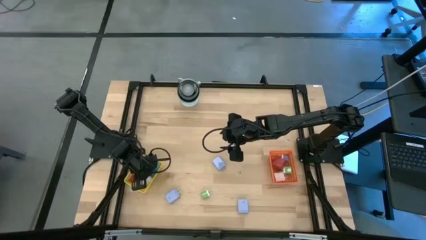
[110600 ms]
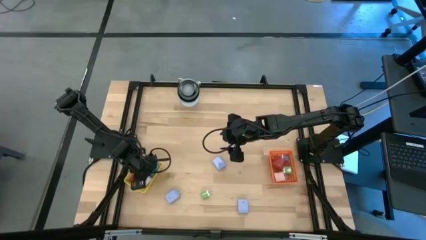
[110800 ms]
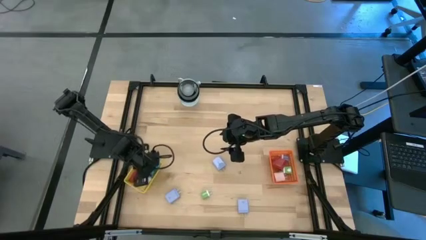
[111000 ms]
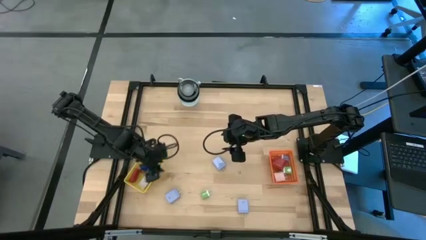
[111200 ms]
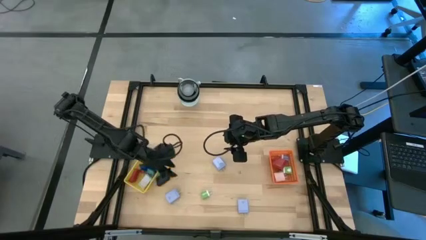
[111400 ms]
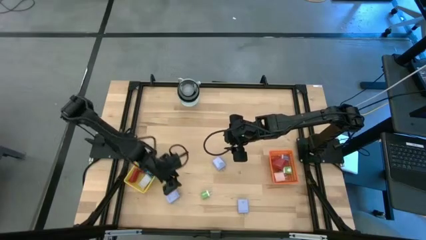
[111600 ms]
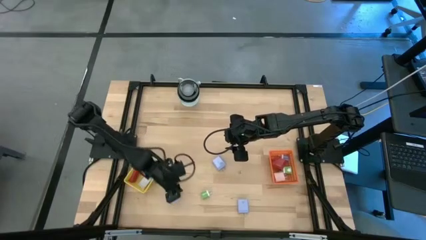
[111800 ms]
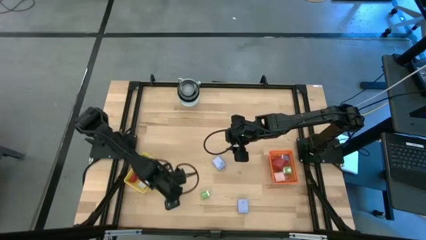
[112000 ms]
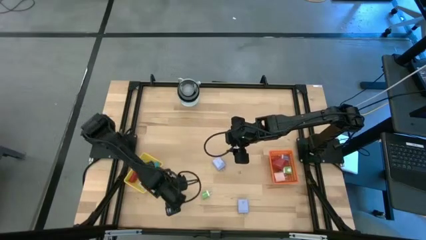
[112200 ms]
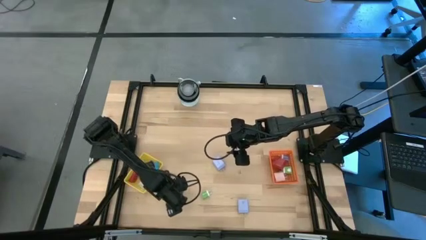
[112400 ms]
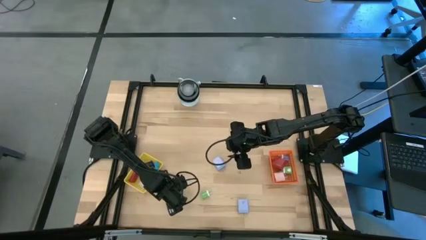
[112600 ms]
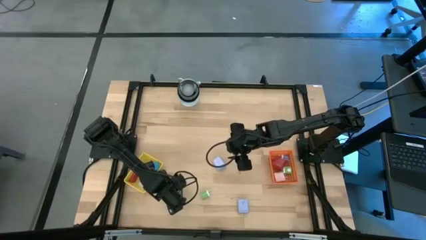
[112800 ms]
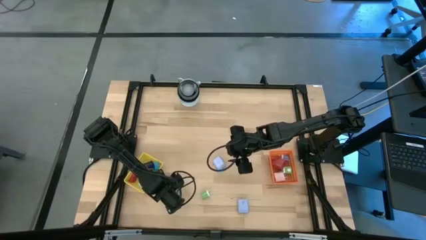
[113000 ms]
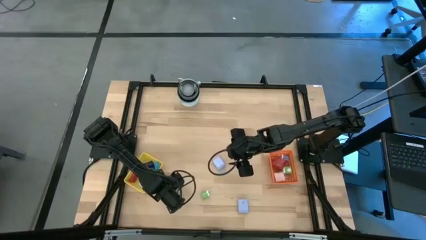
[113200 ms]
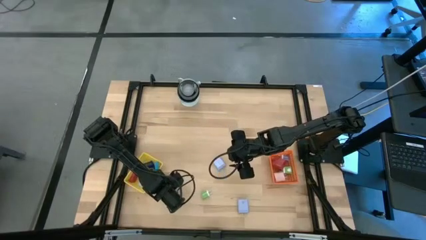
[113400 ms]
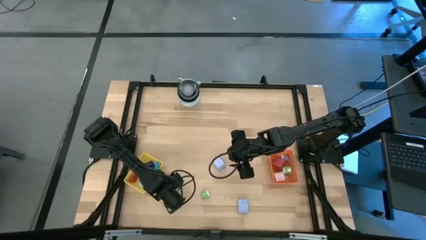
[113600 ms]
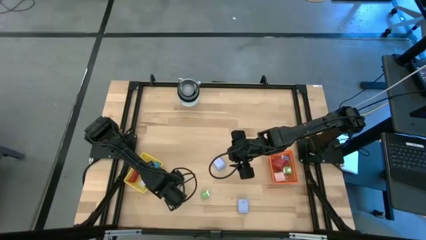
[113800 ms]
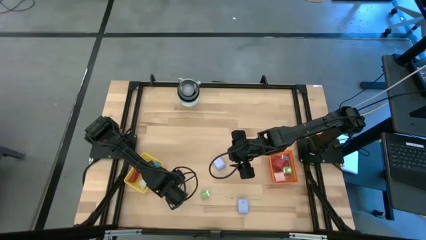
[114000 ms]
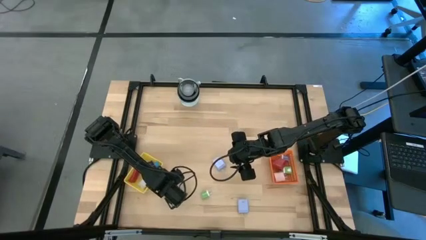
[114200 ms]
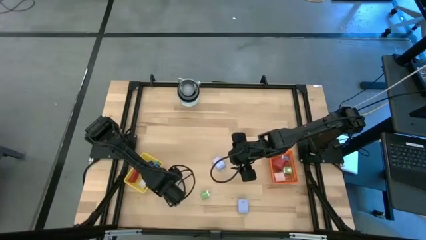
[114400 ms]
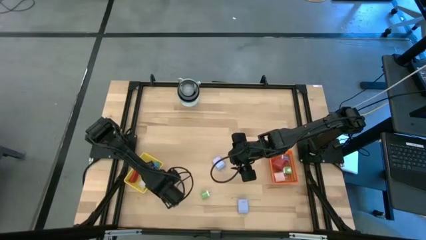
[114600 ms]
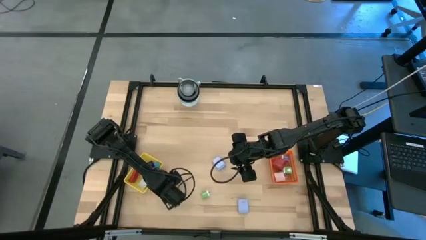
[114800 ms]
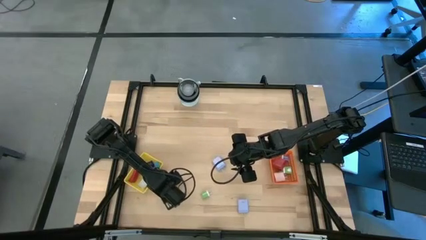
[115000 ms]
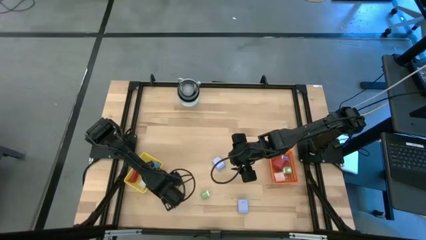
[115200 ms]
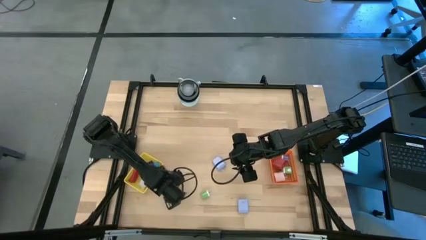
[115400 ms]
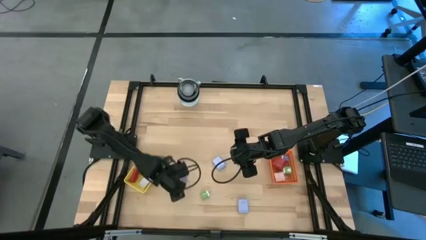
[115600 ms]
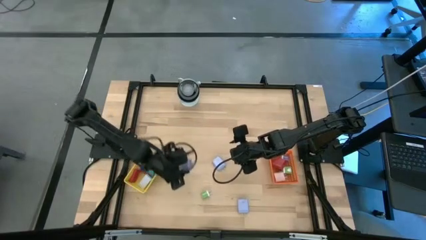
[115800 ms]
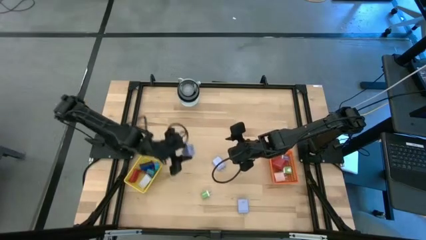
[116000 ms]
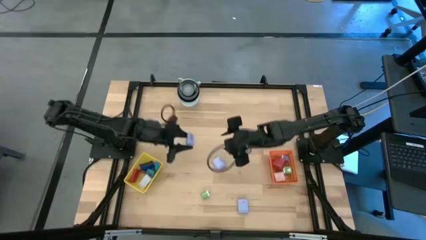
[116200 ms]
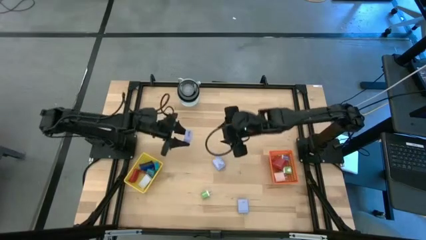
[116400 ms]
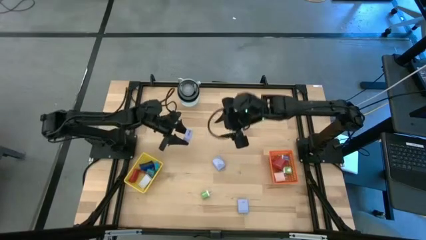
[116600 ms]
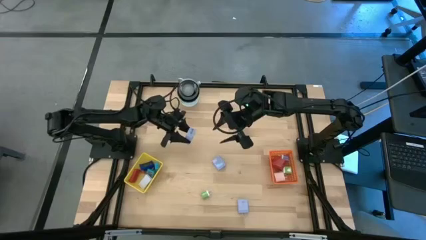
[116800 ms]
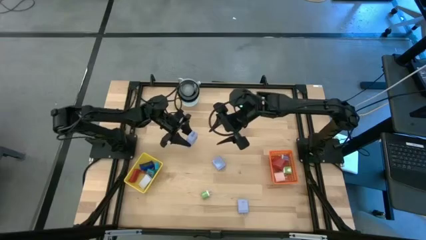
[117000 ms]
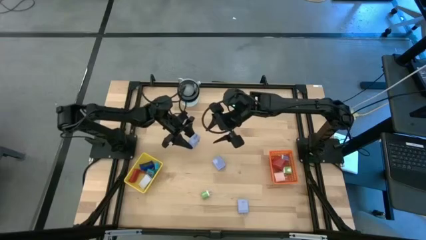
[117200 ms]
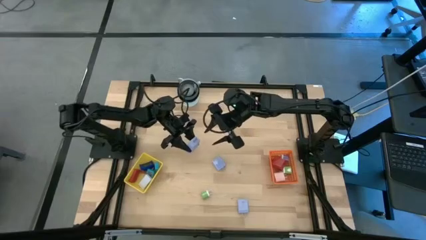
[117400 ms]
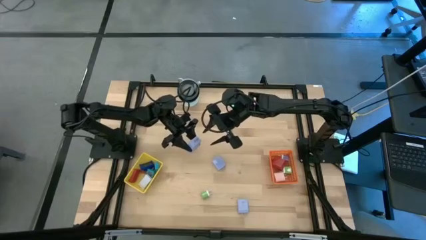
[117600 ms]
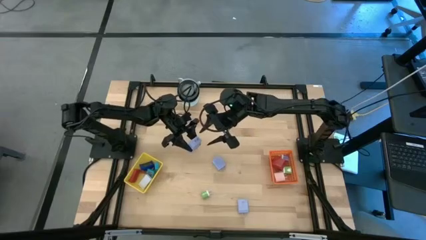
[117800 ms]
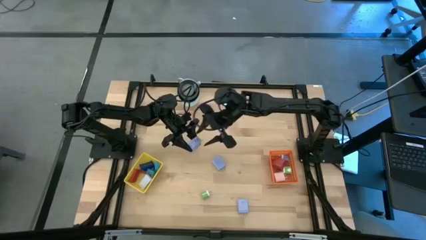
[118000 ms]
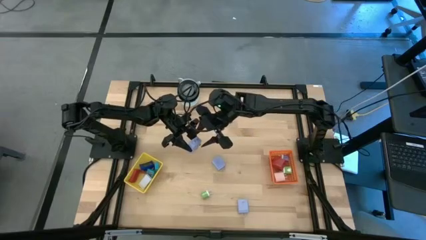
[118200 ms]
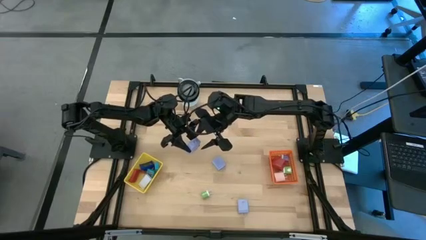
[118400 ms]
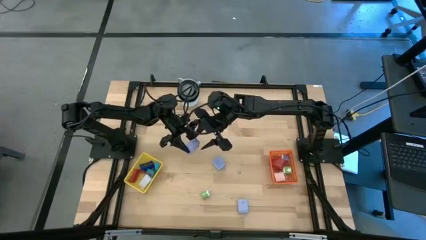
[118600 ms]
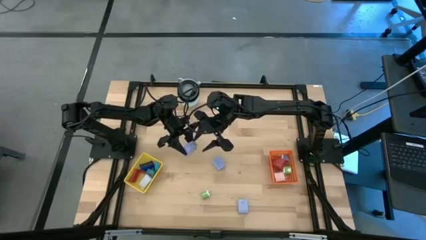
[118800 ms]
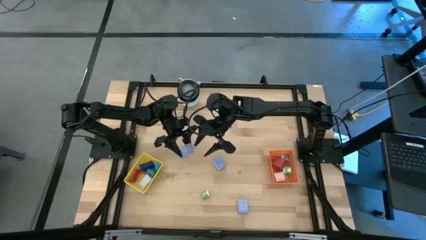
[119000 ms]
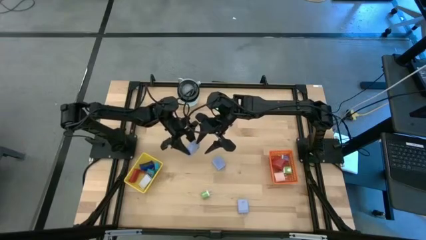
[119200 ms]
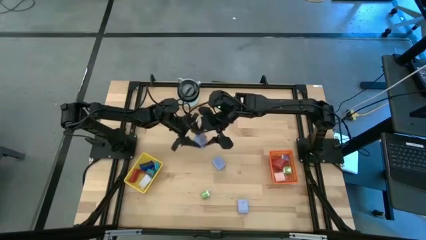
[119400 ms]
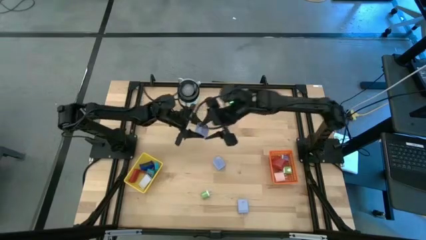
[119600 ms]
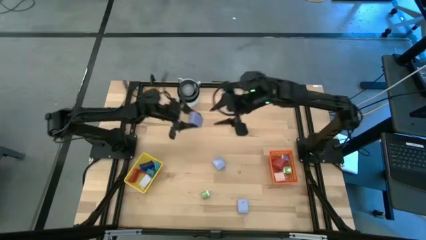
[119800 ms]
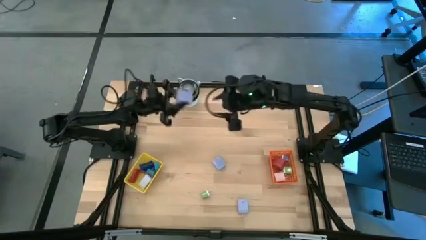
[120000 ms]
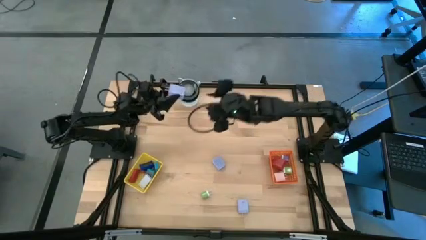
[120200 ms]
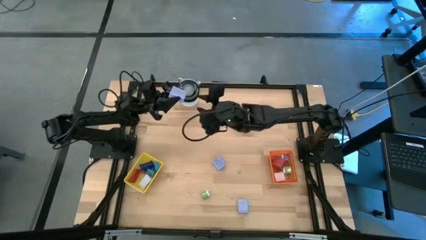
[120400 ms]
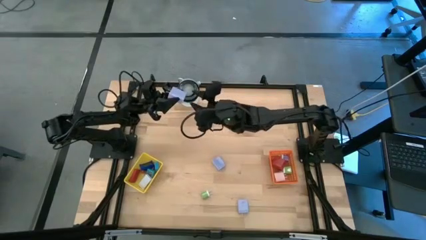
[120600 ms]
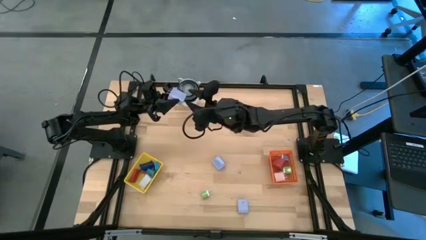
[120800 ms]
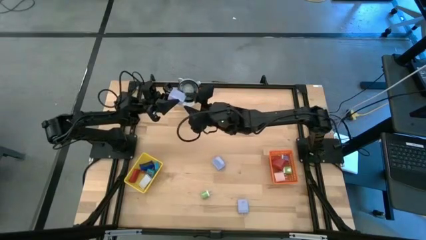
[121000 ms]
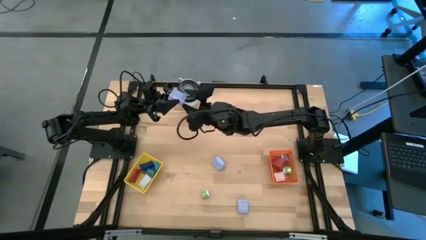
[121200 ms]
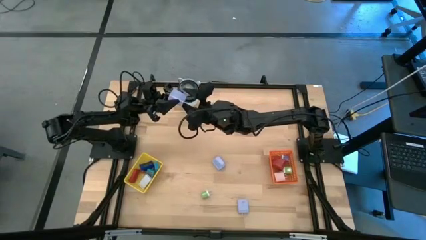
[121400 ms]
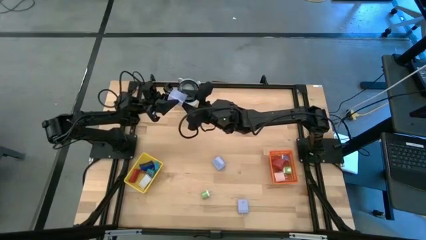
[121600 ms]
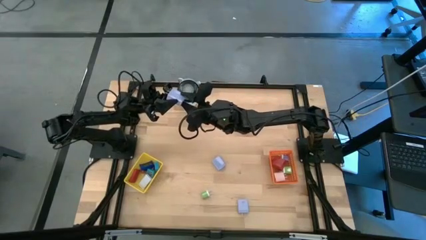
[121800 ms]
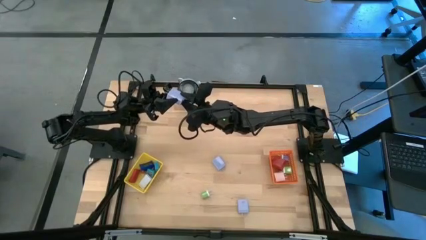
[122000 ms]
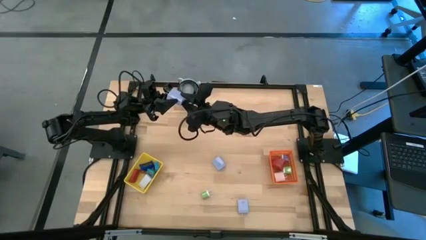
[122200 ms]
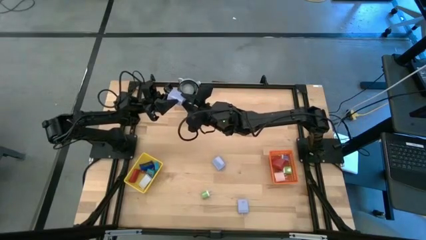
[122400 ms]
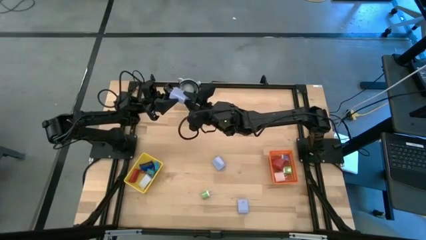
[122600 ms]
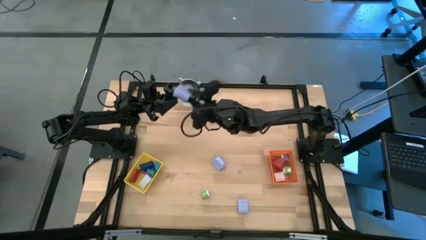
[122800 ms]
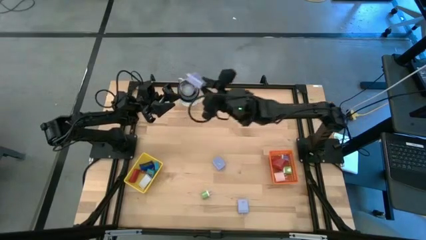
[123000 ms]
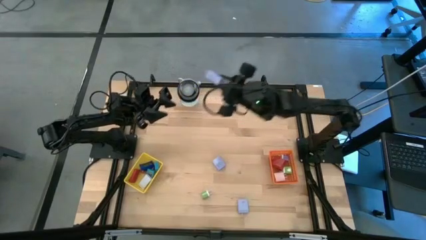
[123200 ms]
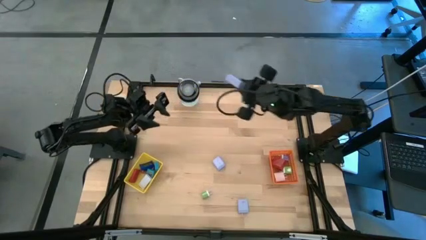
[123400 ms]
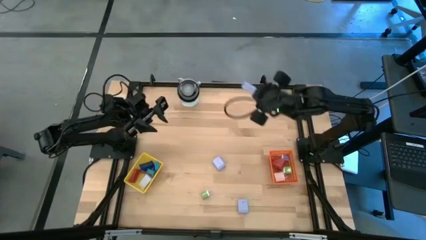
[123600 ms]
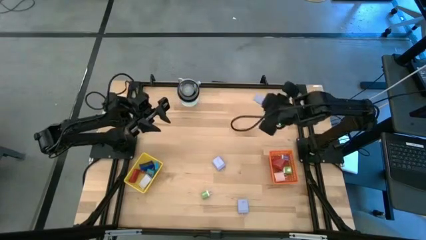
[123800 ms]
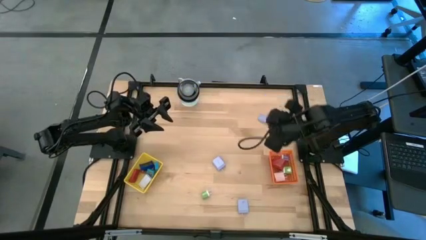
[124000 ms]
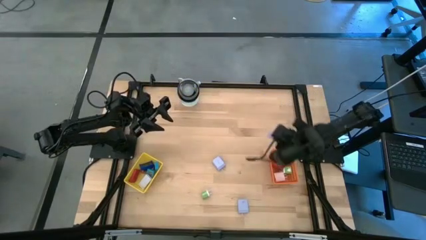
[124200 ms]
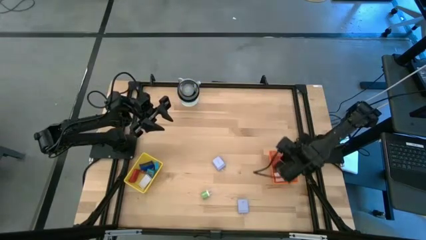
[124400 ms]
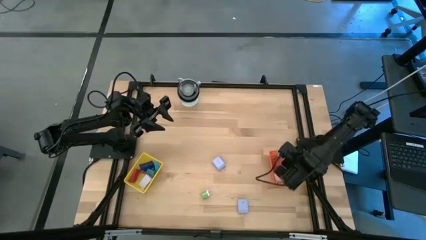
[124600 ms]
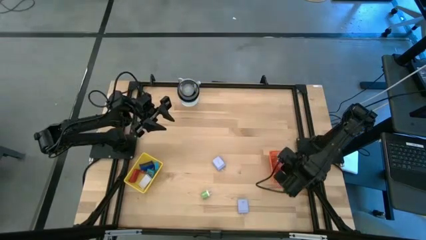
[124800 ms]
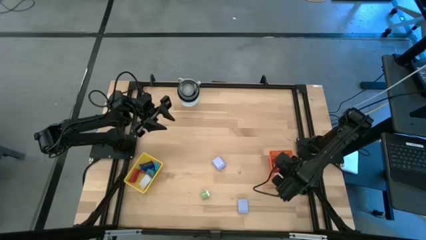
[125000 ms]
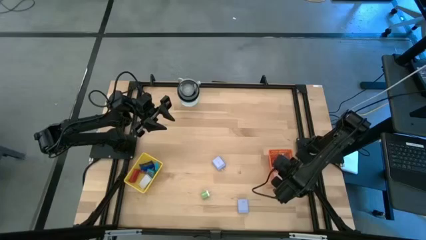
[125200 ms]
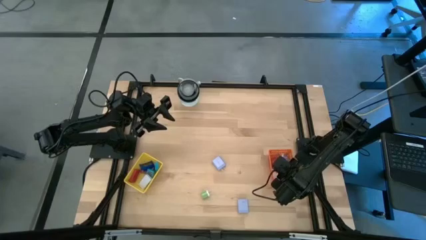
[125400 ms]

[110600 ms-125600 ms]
Task: Pick & Place Office items
Put the bottom left white charger adapter into the orange basket

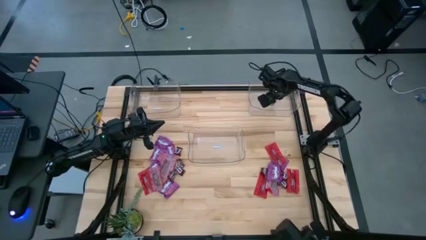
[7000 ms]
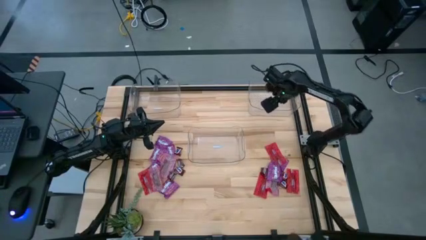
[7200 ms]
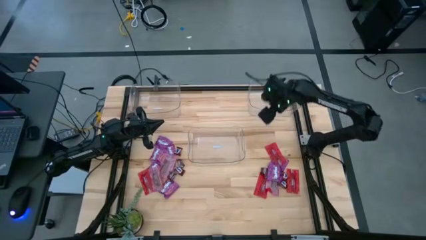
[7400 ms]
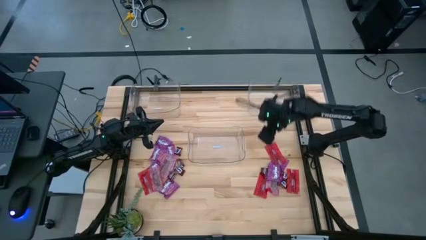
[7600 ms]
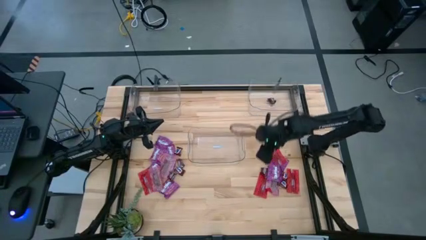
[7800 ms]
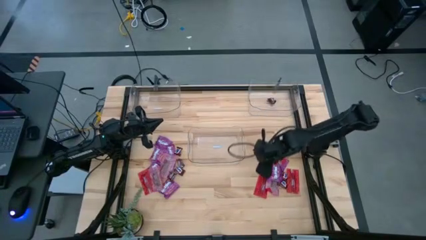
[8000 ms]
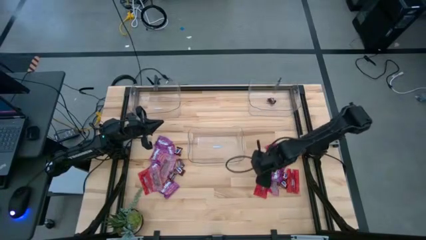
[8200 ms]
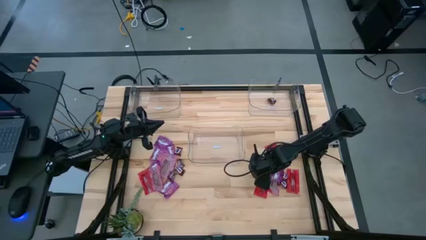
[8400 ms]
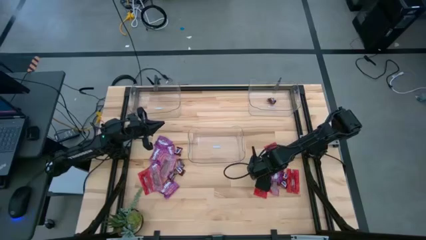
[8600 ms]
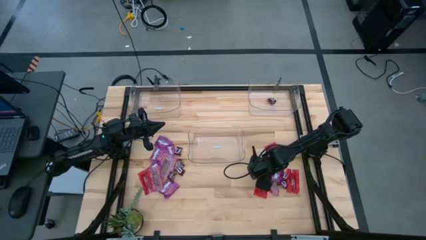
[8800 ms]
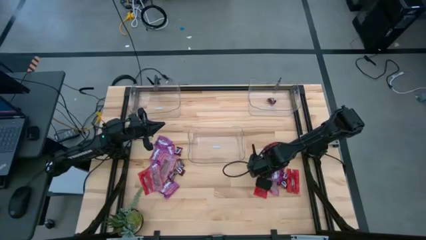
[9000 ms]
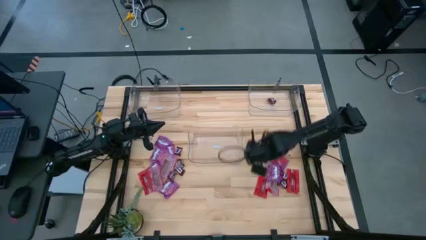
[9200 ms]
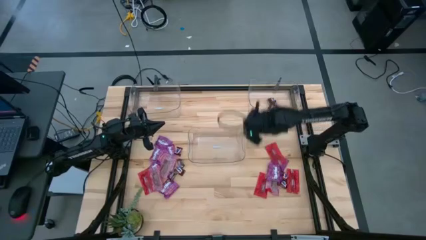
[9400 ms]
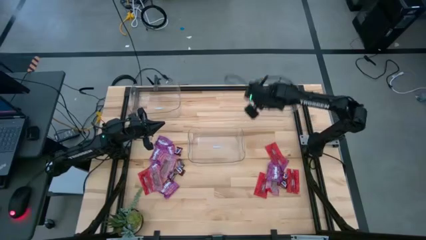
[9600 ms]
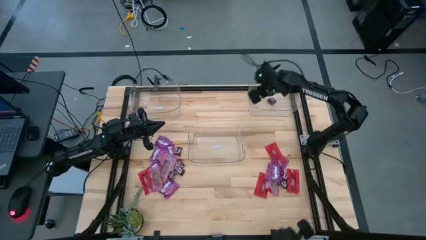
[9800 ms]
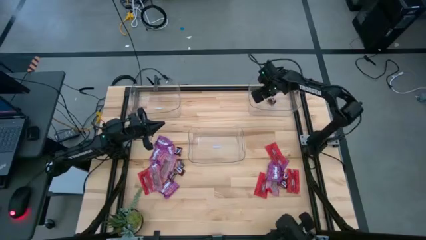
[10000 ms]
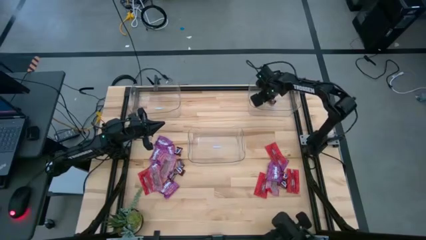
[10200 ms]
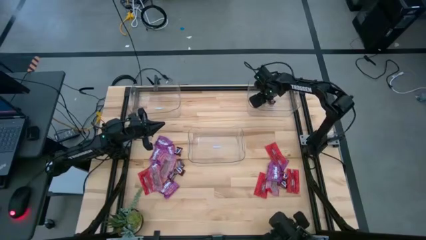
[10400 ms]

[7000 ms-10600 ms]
Task: Sort candy
Put the brown chocolate bar into the top right transparent bin
